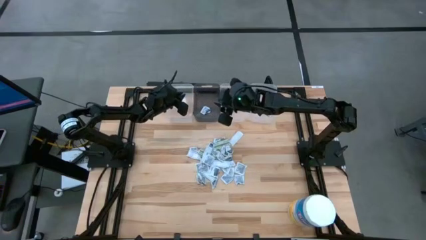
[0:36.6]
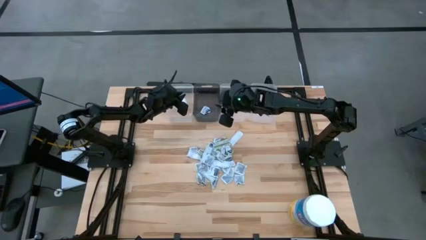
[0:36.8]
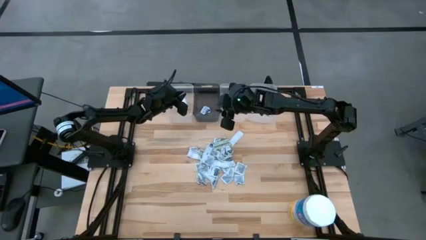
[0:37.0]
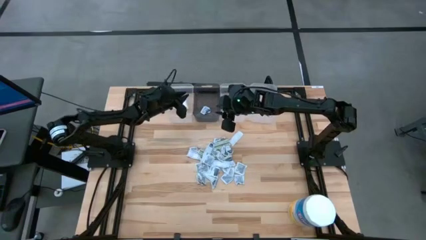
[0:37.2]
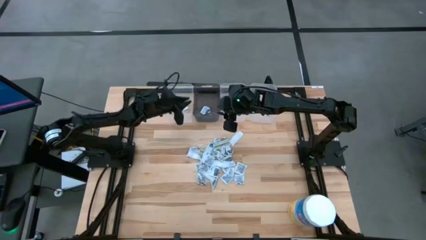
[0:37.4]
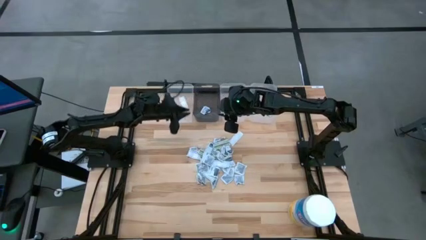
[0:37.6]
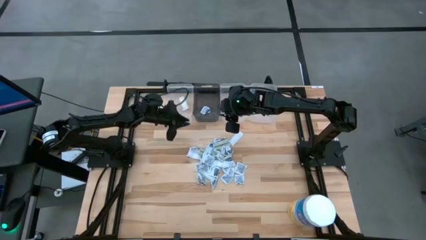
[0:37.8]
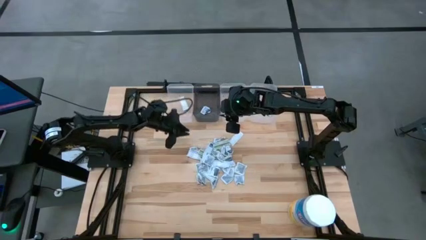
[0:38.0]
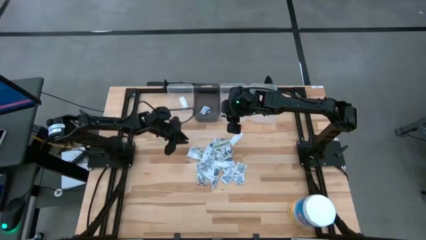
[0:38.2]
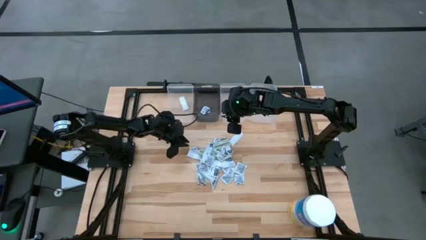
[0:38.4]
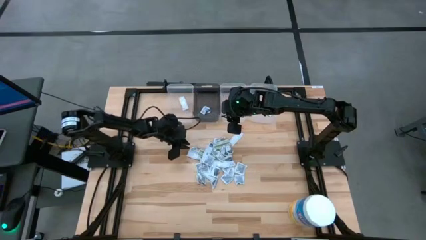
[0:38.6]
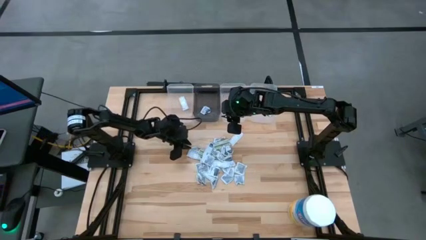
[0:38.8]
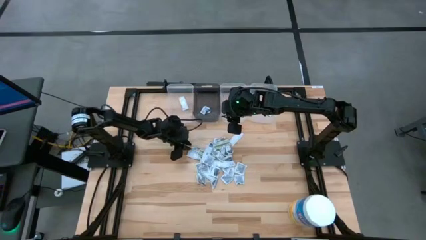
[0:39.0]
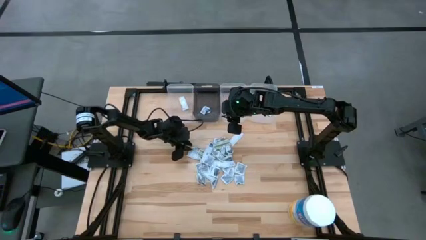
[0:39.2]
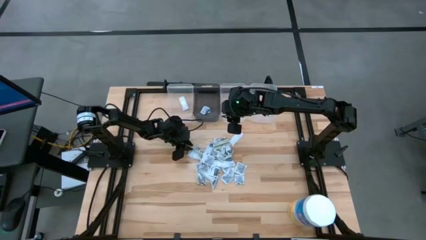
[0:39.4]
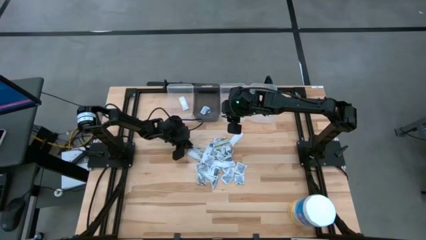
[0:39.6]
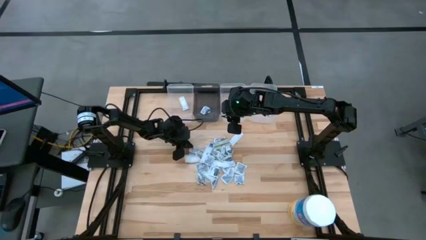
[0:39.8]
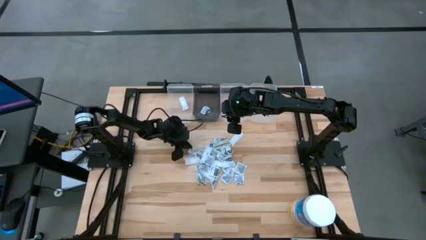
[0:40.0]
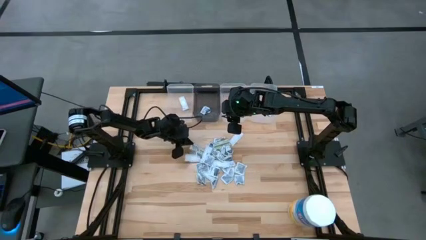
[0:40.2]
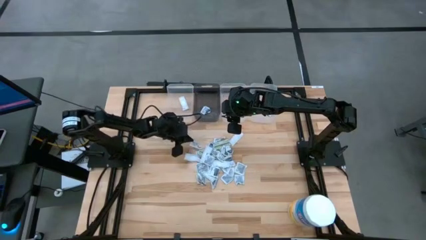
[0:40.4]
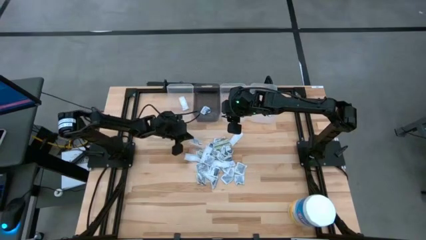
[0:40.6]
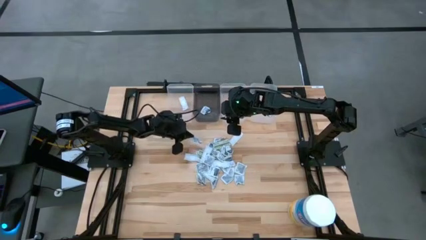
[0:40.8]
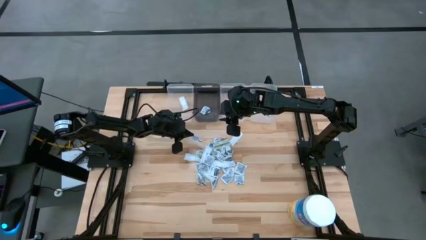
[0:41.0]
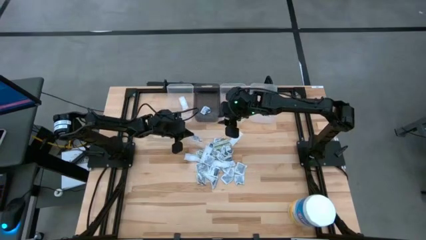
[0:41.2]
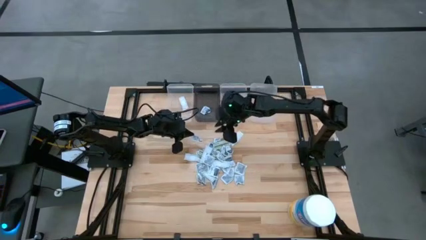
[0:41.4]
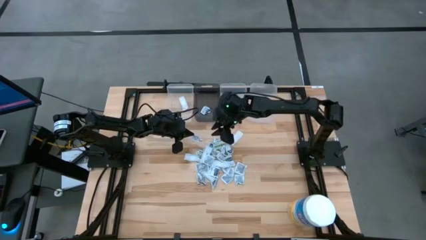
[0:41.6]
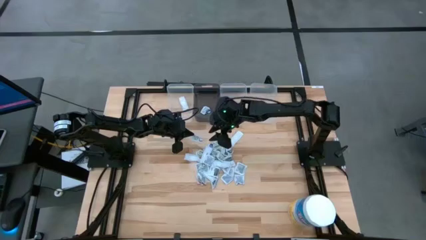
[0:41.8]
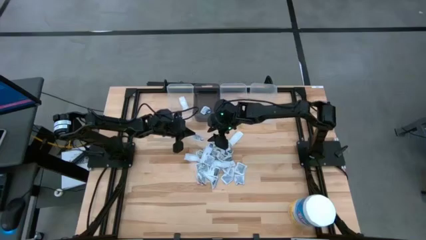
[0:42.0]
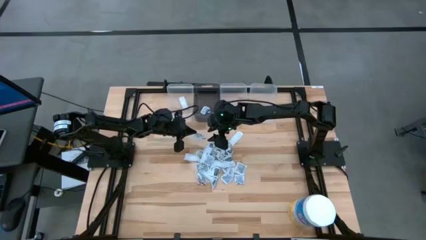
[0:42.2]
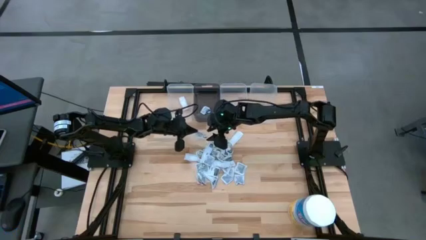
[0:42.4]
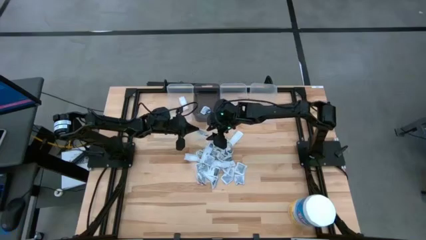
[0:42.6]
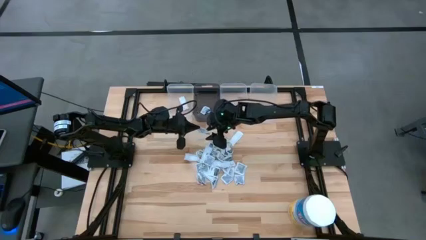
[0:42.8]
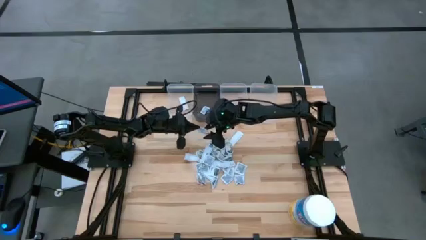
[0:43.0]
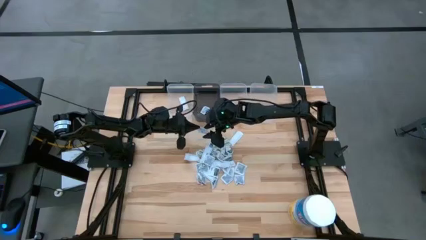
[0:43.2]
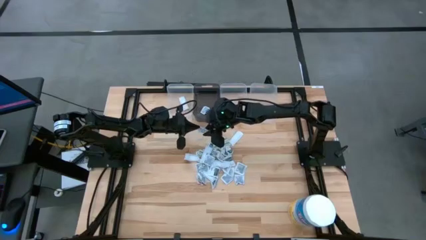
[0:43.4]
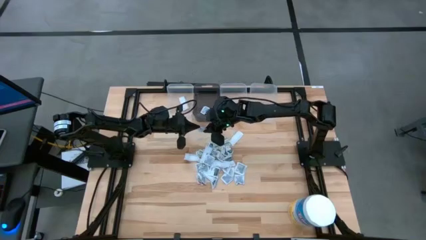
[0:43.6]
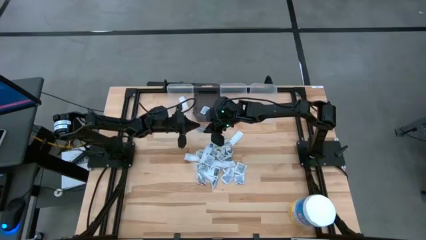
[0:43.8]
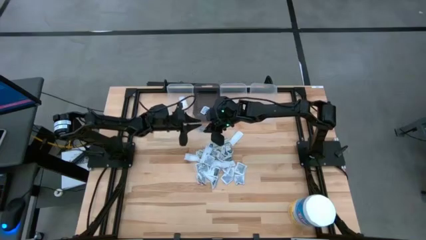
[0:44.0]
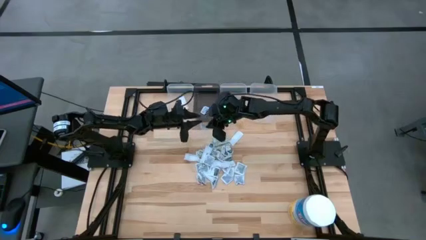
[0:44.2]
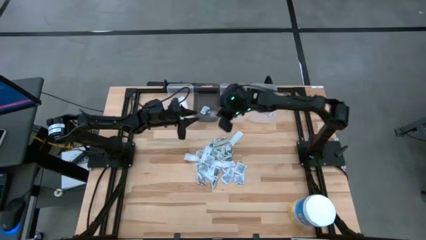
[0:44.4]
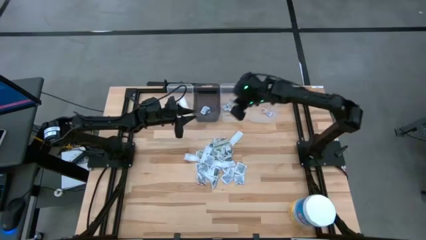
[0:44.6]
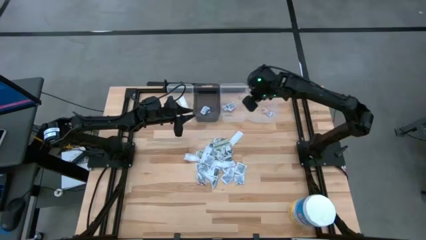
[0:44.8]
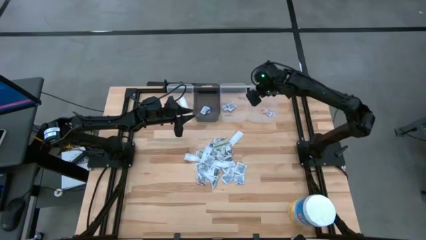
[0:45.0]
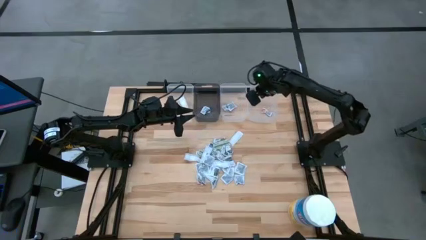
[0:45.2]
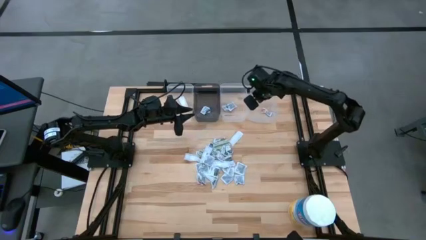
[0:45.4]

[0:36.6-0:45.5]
Task: Pick & Place First Aid Supplies
Put the ointment pack into the right transparent bin

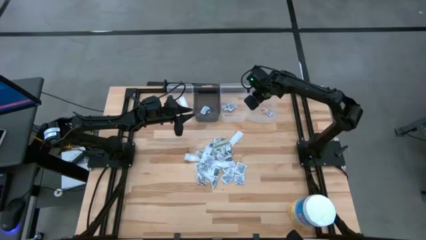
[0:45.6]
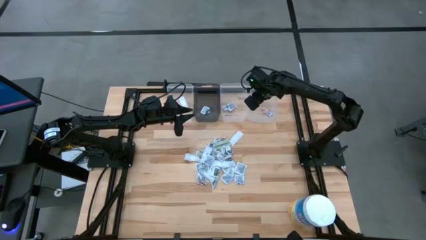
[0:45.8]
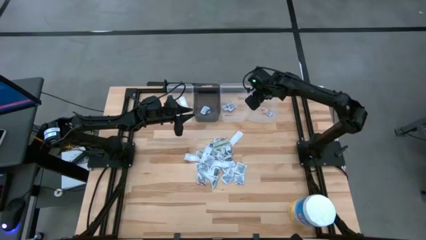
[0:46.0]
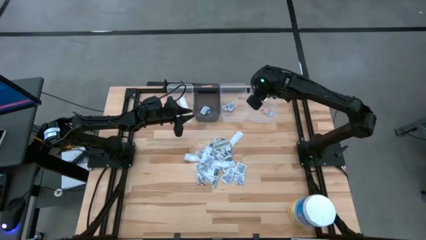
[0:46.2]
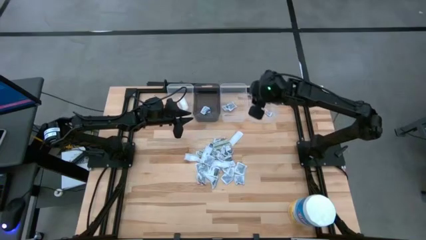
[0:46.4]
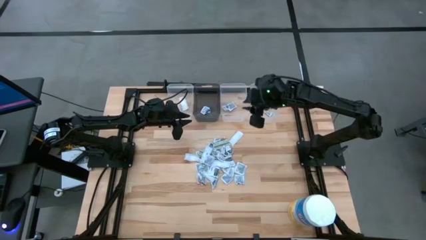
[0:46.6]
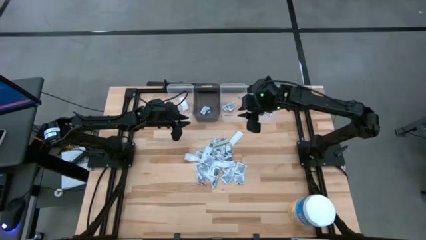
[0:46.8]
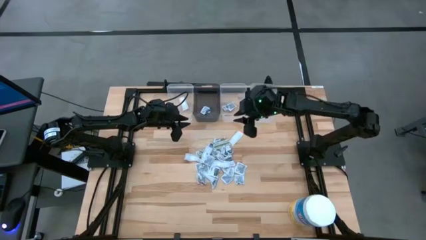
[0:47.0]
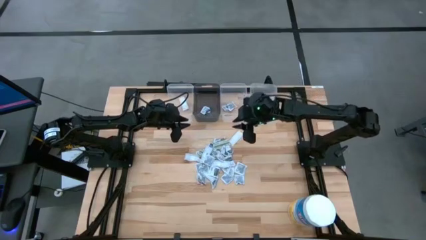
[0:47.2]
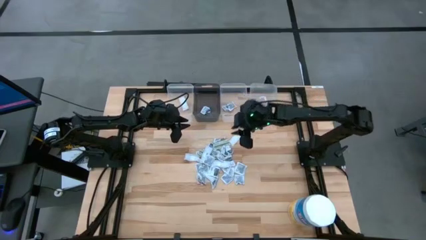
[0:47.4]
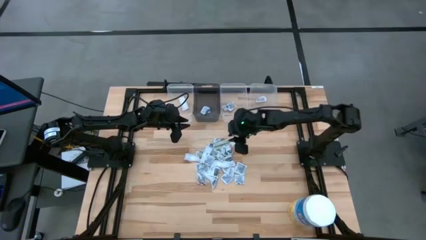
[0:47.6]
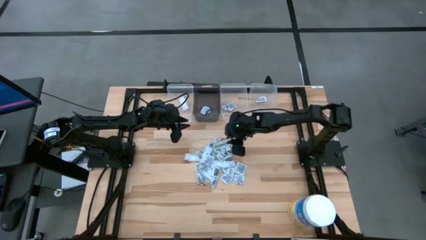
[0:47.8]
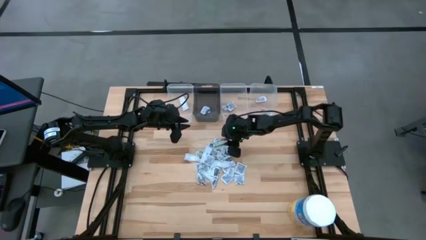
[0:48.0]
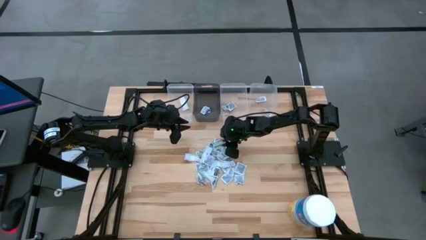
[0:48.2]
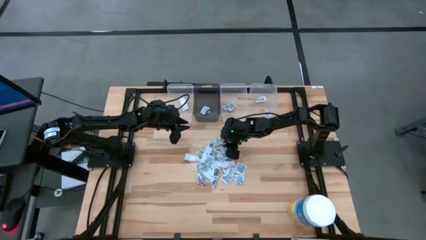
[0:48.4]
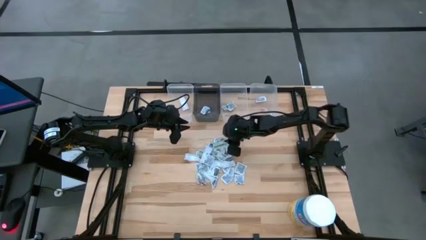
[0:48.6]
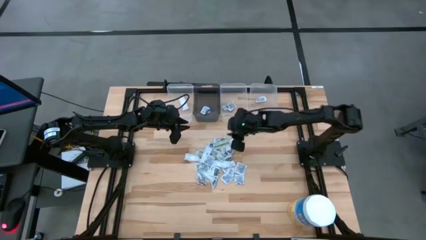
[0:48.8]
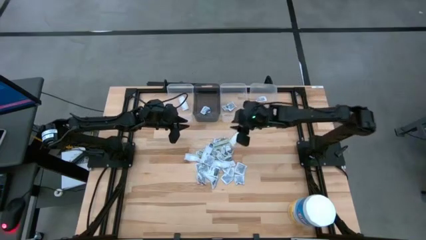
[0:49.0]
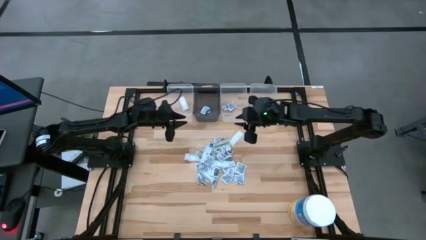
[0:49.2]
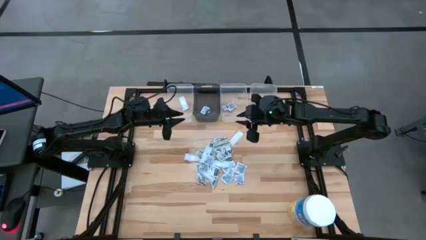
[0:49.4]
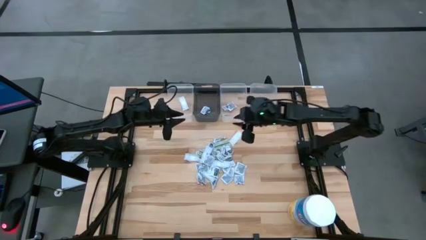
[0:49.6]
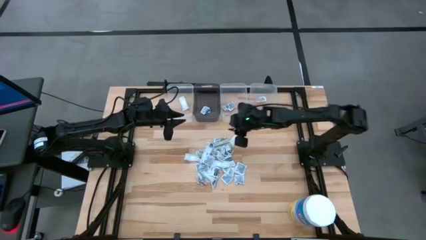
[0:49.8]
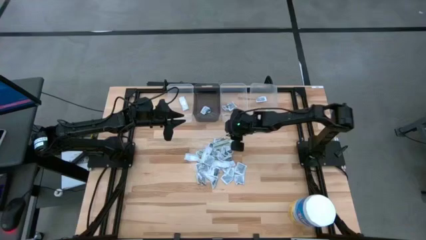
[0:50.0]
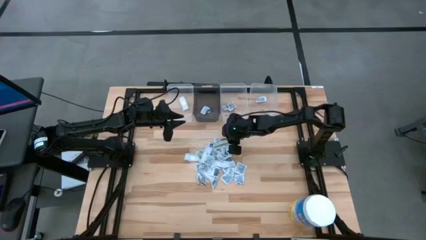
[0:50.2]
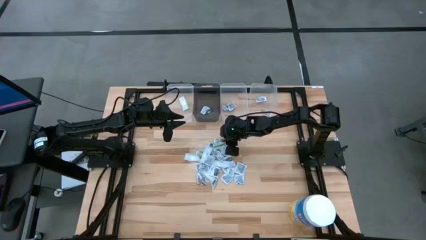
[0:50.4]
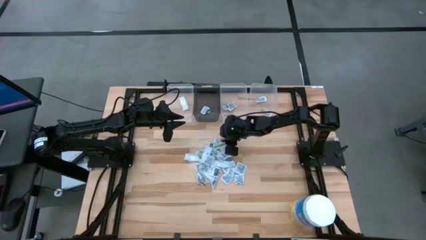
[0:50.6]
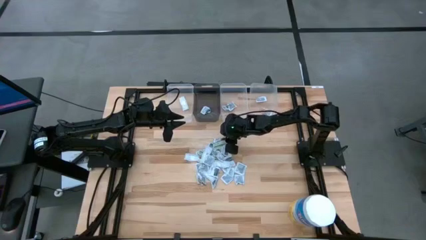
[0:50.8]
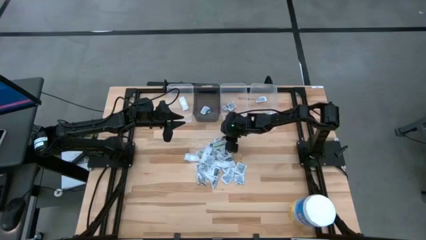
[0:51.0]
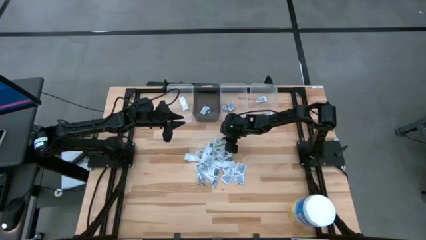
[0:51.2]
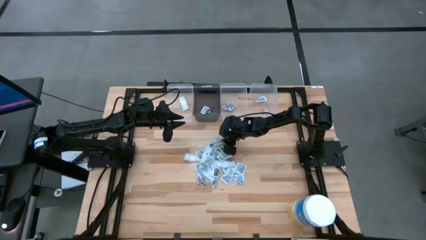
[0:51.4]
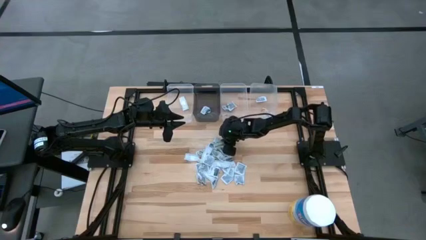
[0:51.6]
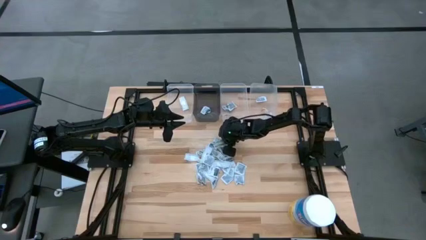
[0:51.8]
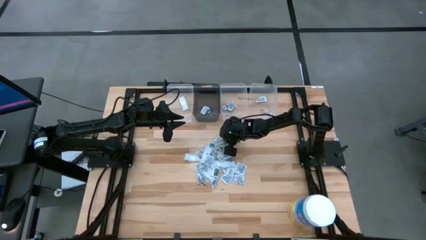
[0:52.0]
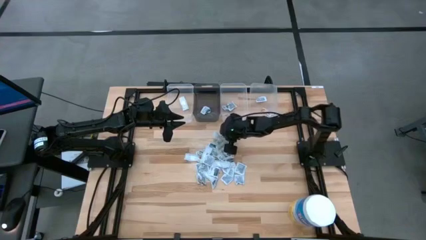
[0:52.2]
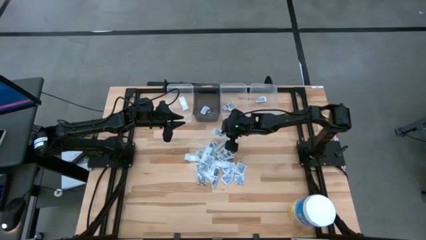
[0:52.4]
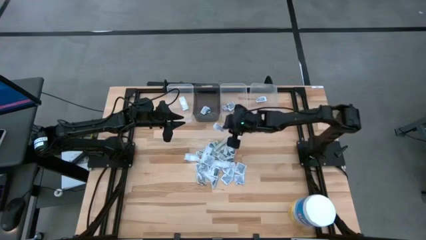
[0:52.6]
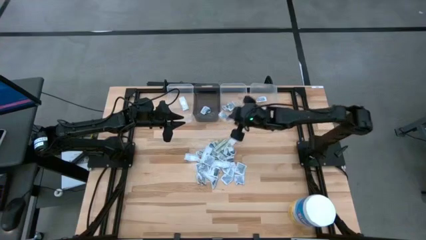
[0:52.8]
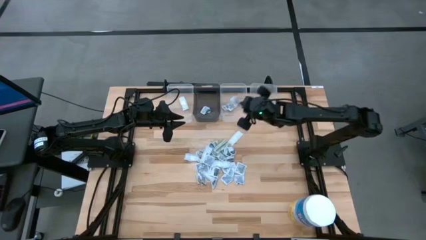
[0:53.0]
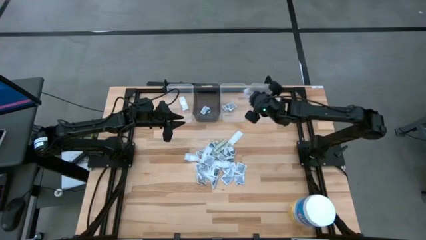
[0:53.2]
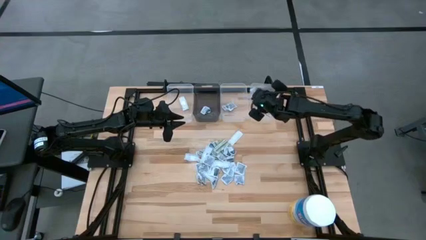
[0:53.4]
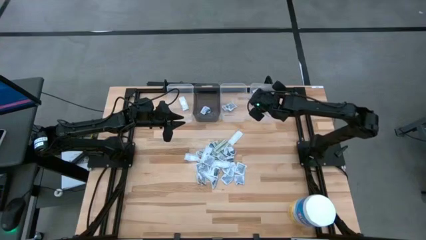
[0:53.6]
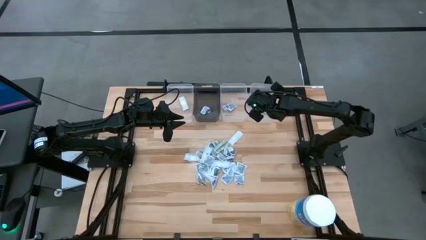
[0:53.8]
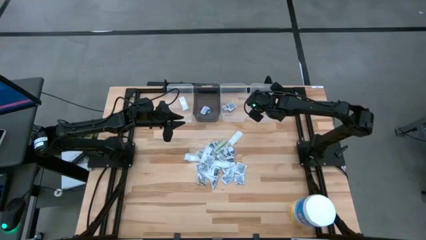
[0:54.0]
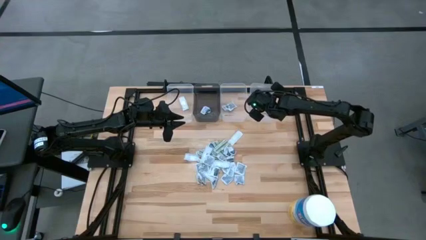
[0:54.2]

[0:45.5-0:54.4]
Put the ointment pack into the right transparent bin
